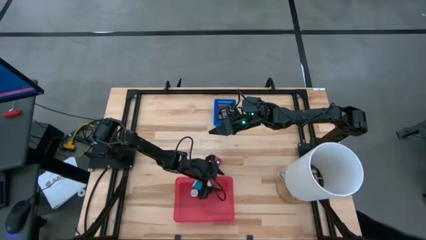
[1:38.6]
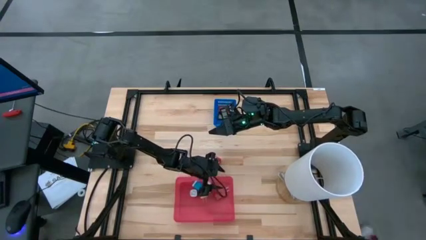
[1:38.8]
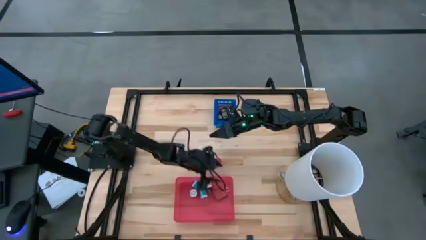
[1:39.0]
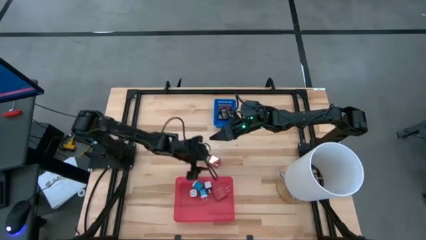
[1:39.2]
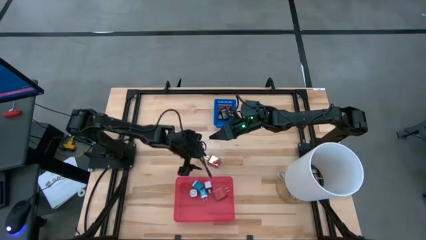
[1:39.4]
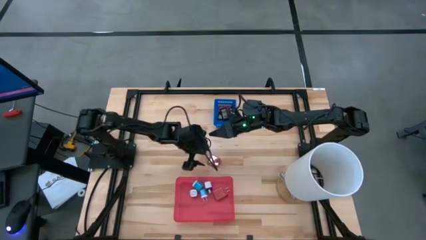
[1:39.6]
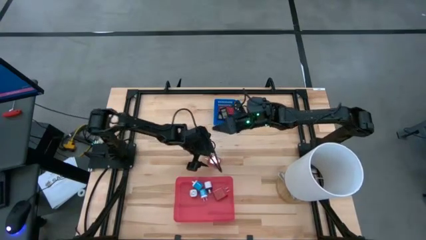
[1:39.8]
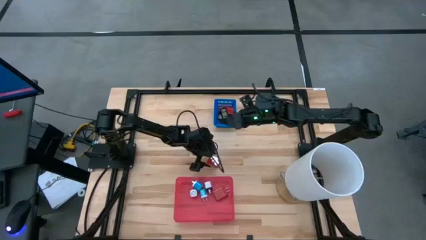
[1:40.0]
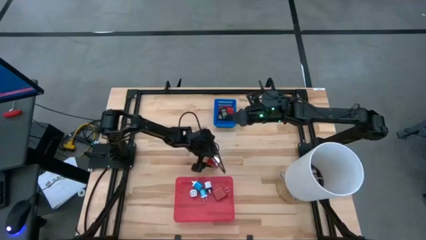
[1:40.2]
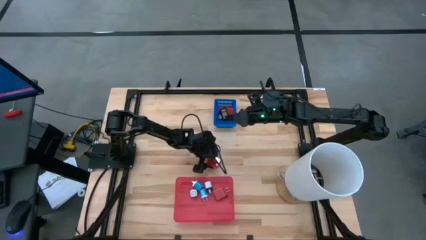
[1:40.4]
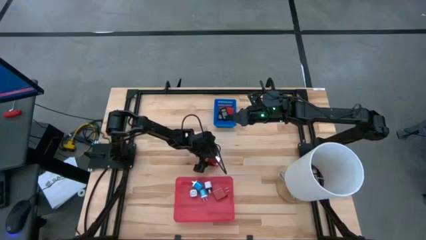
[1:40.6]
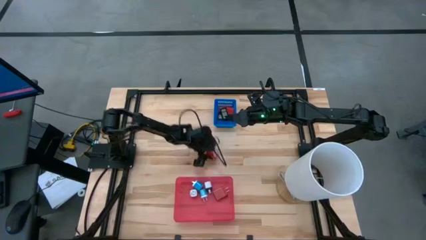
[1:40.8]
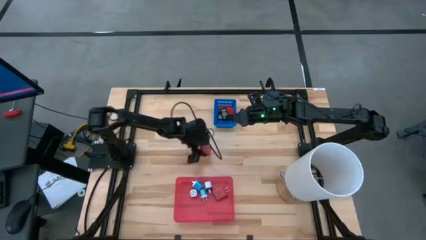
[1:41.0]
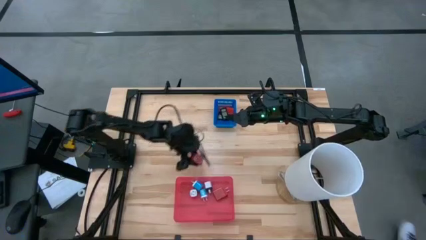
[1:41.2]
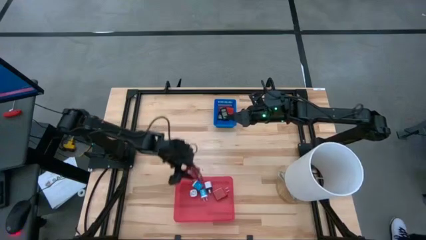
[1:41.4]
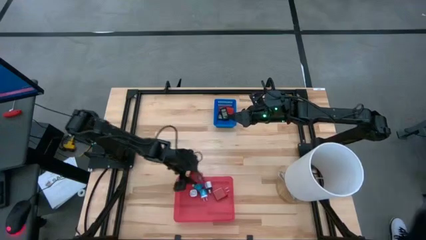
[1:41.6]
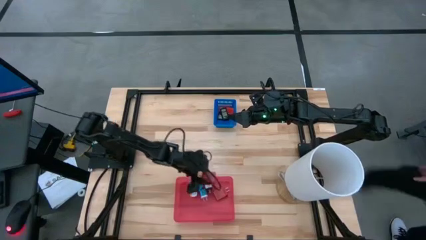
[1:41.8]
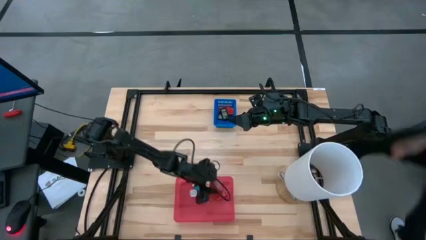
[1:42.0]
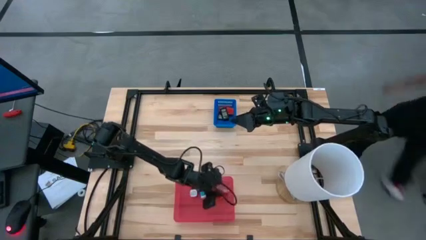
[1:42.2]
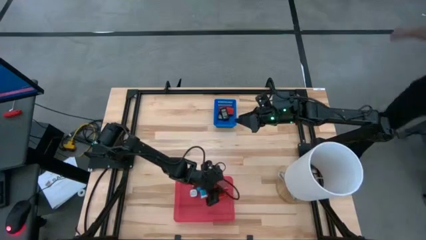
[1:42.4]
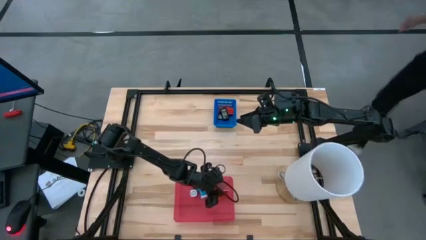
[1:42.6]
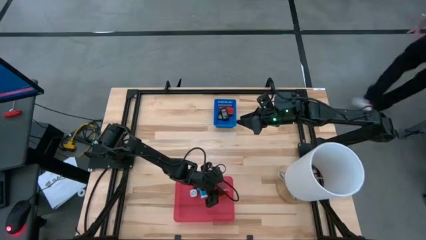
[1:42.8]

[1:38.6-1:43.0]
Task: Pick & Place Office items
Put the red charger adapter into the red bin

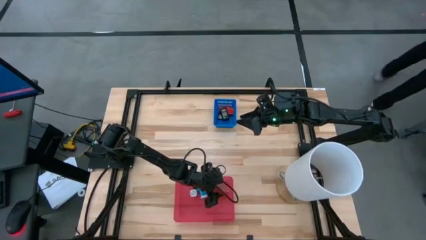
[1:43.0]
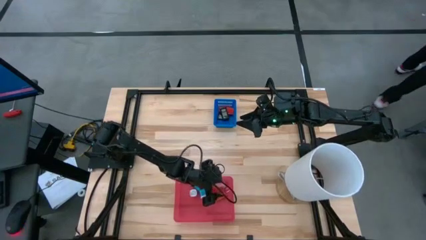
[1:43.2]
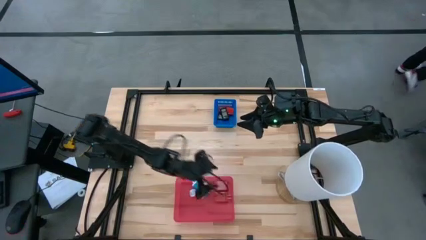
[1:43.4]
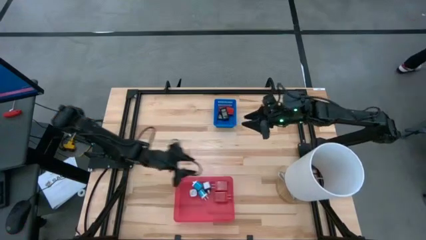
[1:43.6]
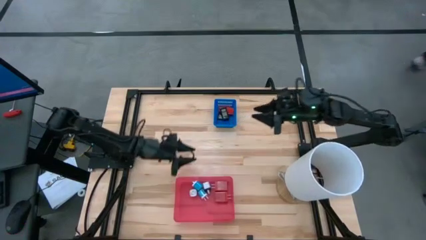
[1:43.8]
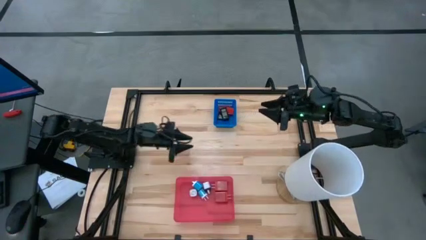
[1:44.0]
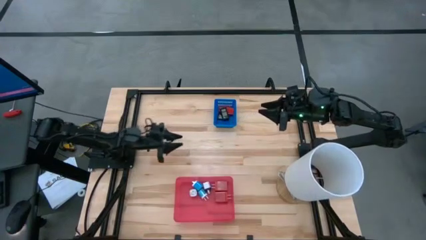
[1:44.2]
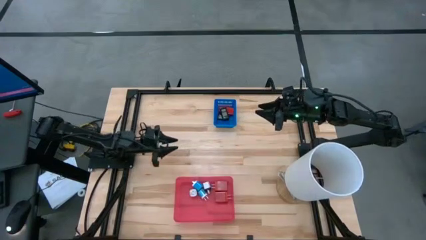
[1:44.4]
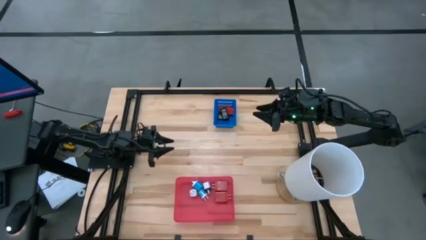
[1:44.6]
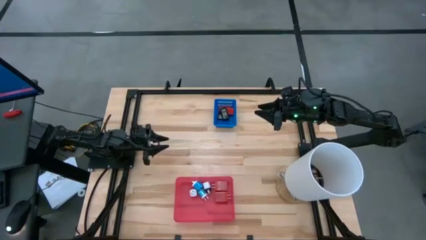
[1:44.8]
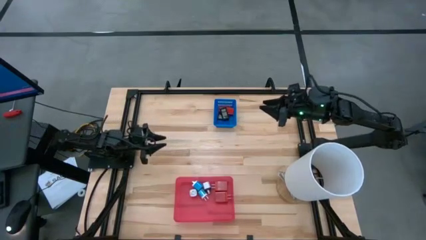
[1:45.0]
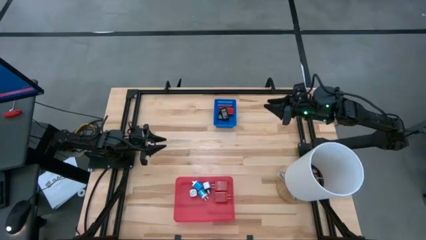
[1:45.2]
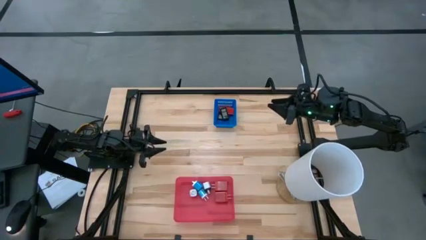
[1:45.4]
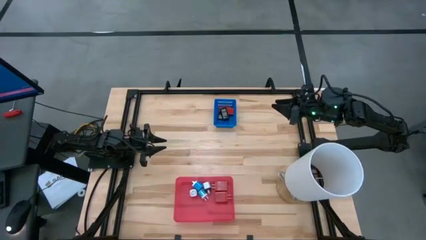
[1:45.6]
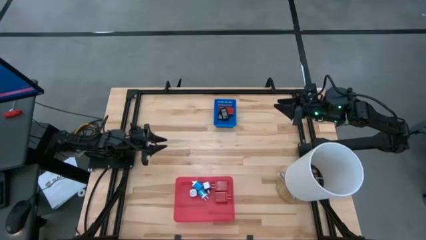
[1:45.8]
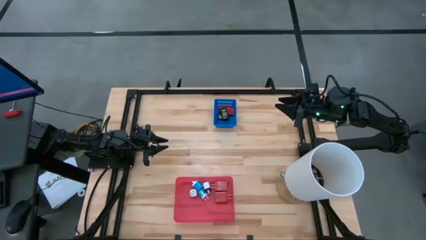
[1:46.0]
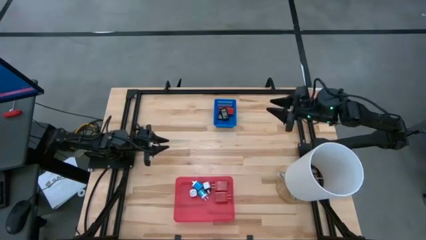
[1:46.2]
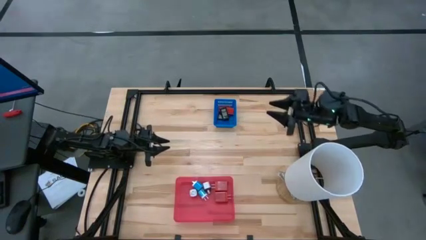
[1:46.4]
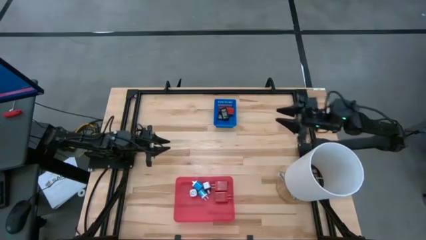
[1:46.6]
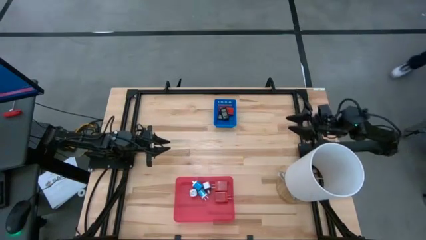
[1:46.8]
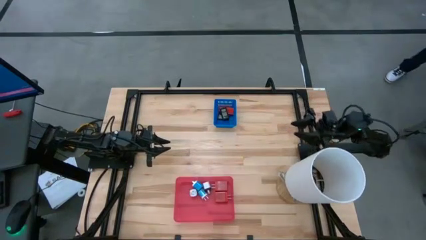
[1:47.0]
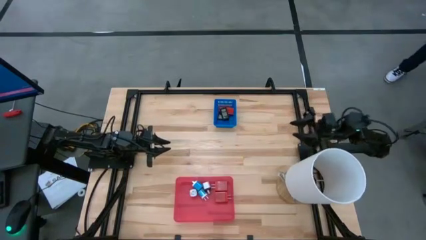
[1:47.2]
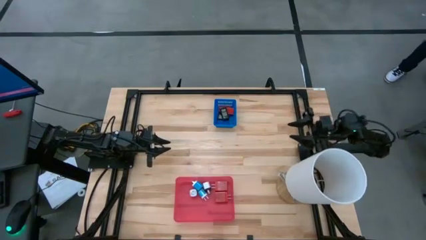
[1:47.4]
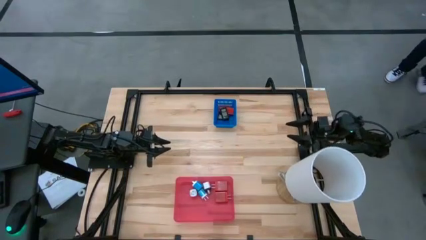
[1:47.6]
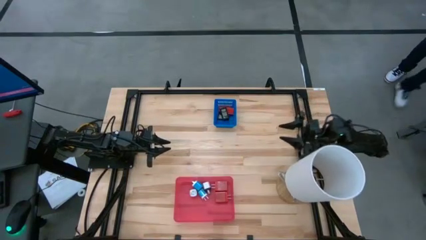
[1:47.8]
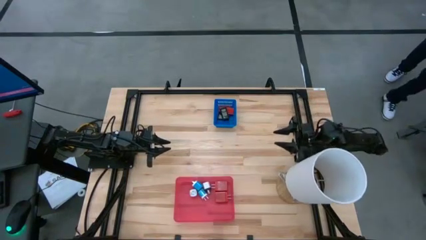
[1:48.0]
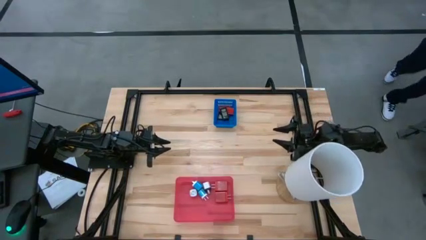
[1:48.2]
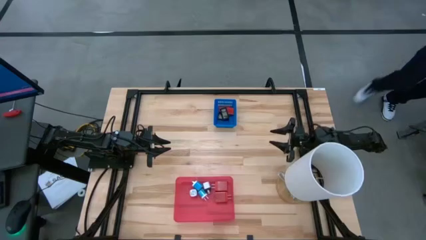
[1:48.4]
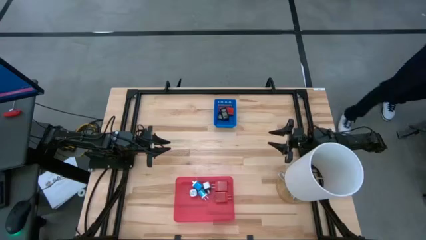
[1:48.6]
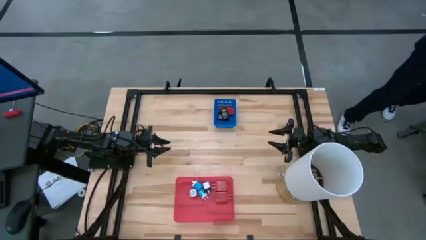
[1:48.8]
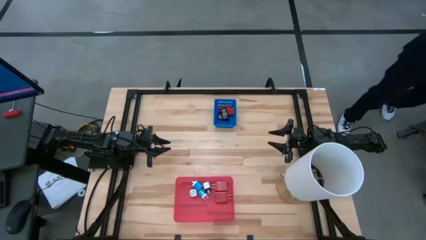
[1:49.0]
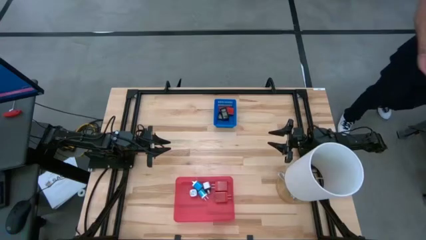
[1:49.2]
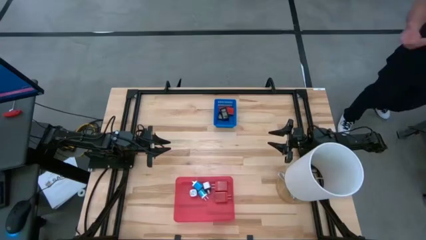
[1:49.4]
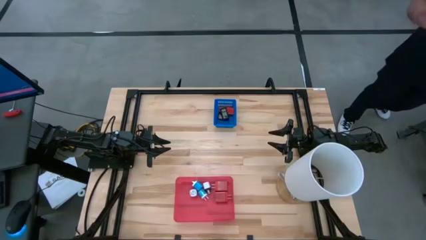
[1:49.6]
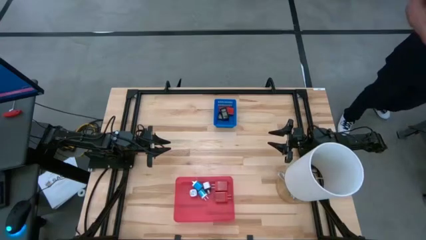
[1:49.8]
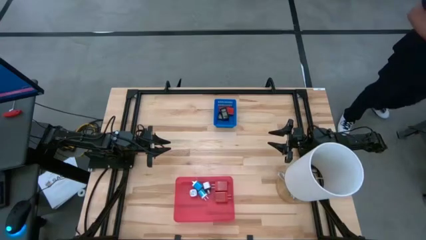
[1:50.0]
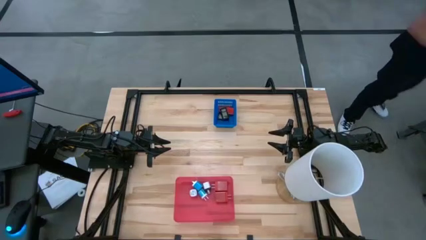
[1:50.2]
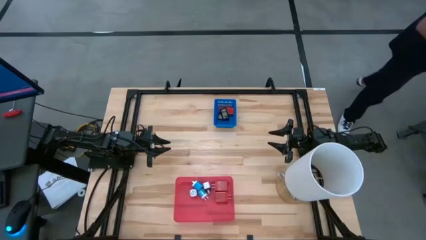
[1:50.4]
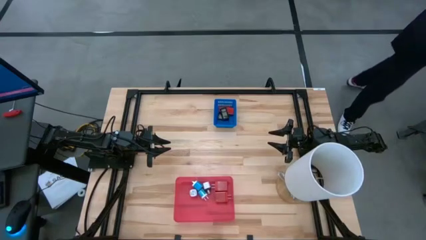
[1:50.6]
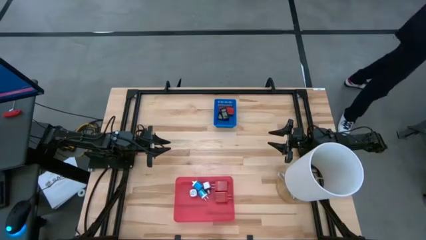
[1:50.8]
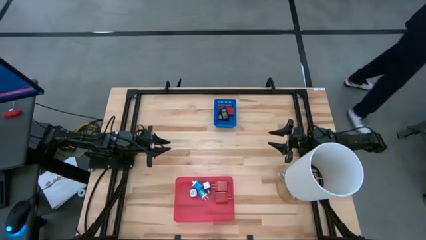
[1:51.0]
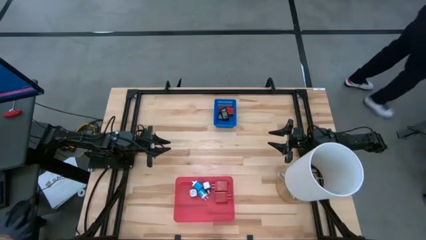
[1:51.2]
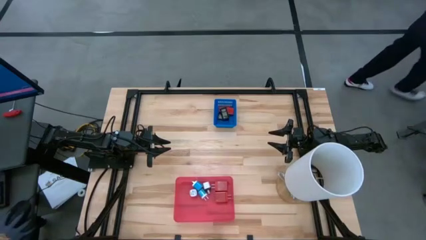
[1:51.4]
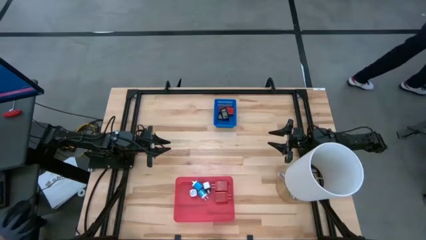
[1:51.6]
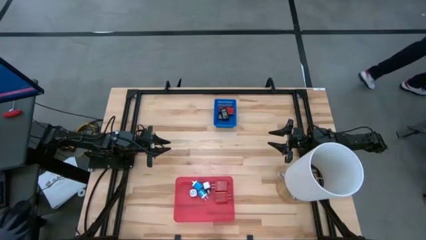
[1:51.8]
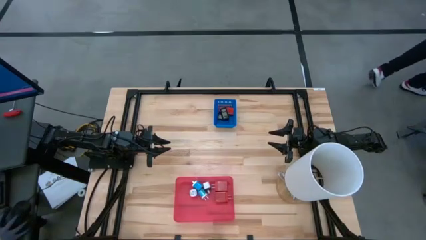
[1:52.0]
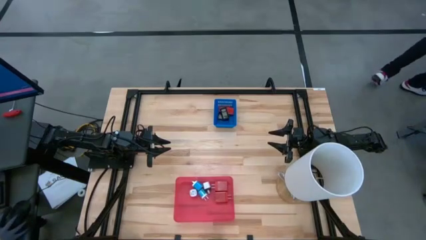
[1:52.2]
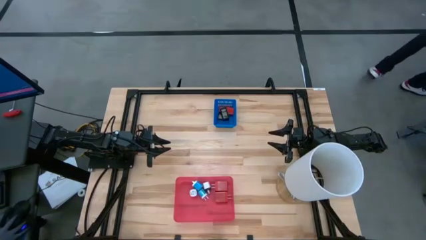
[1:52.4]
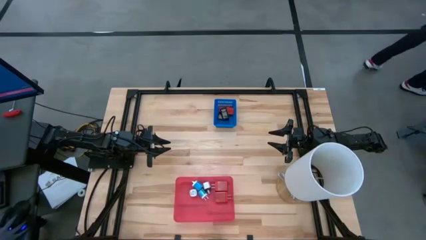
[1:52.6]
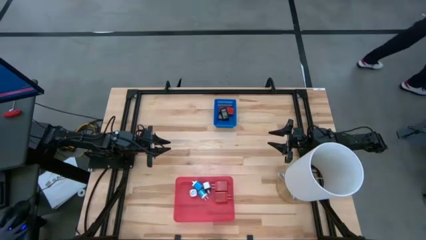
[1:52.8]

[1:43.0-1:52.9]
Return to Home Position

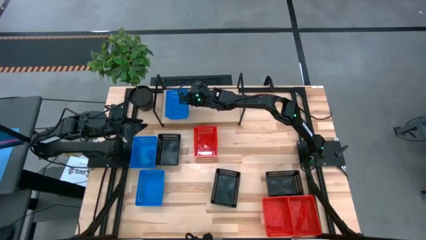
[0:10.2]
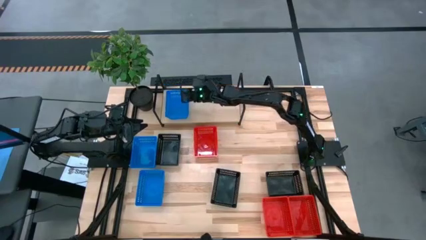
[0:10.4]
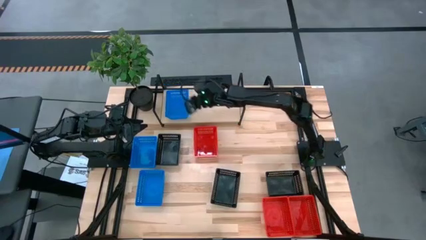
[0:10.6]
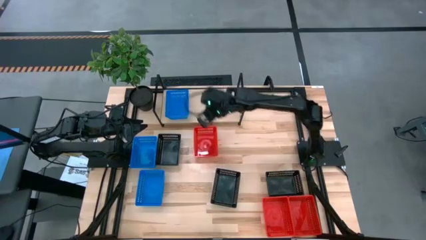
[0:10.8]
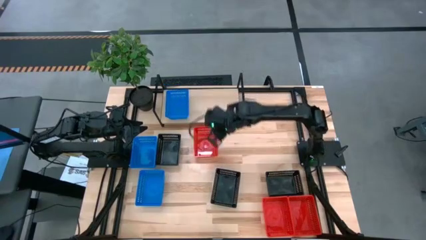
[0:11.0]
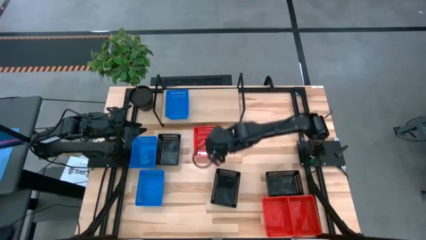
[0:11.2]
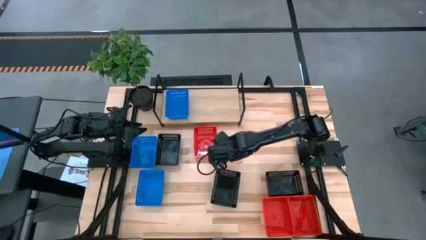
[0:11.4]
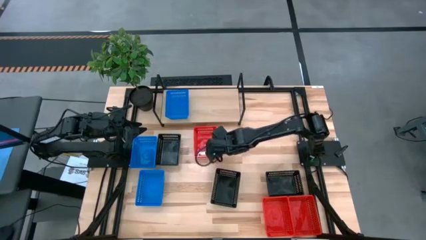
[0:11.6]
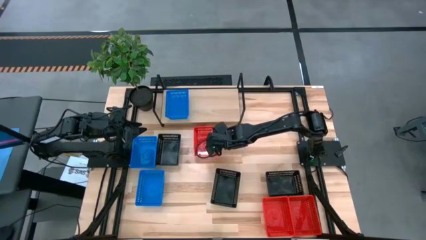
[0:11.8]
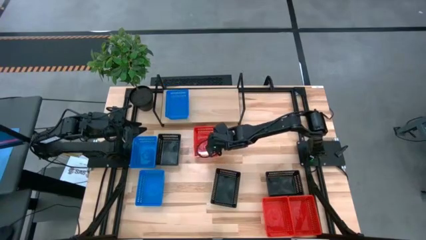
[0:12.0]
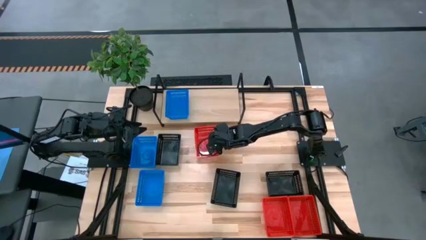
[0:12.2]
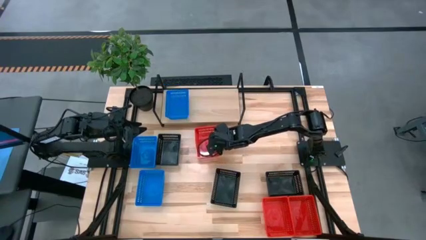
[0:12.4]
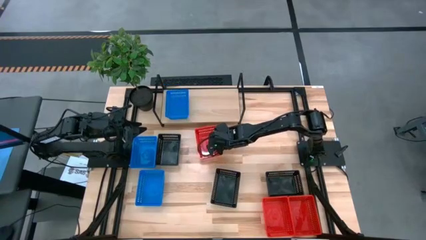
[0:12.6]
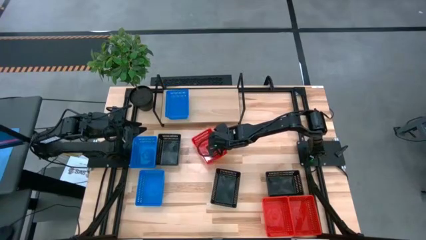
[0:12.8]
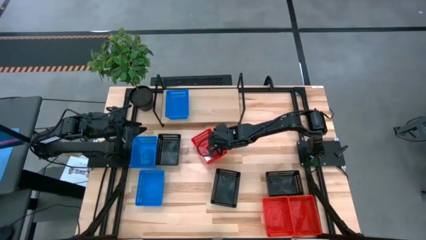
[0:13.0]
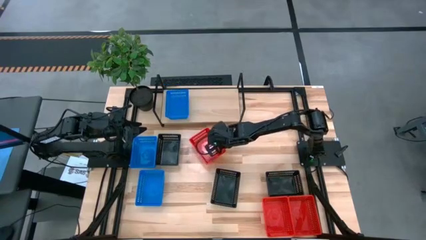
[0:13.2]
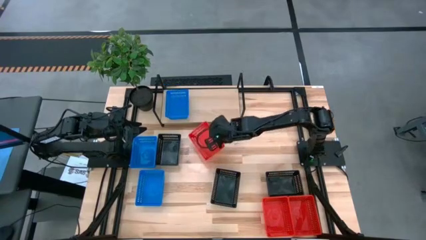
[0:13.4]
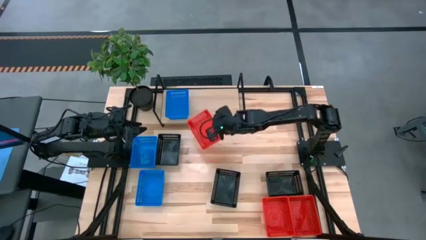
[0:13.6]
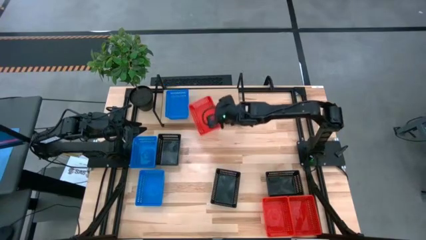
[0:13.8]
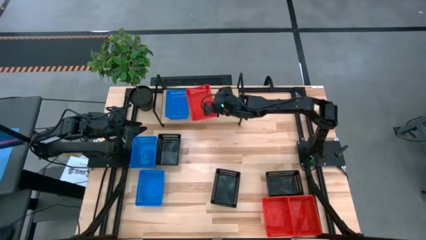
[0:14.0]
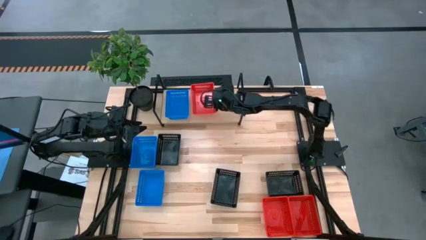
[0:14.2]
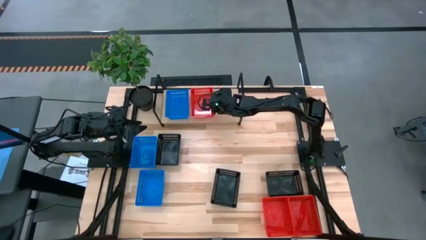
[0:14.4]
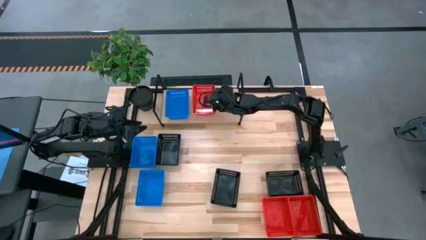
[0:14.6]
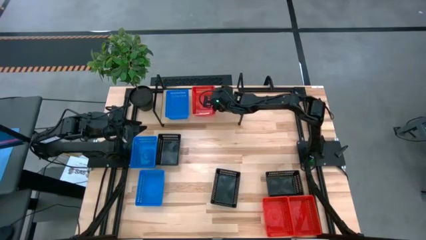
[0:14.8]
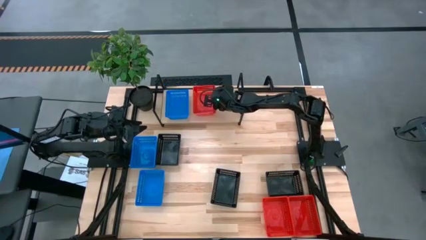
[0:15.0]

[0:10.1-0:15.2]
Task: Stack baskets on shelf by color
Put the top red bin on the shelf
